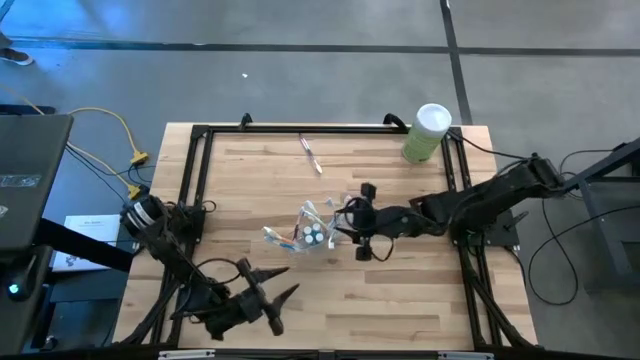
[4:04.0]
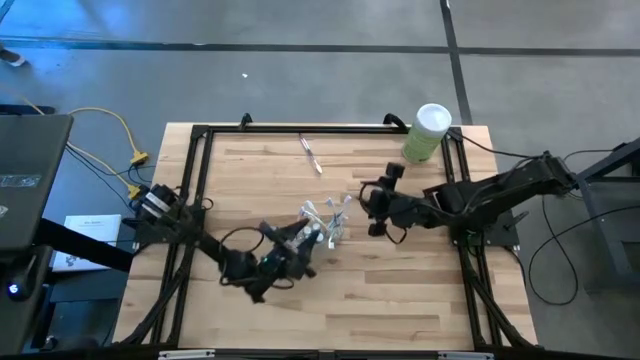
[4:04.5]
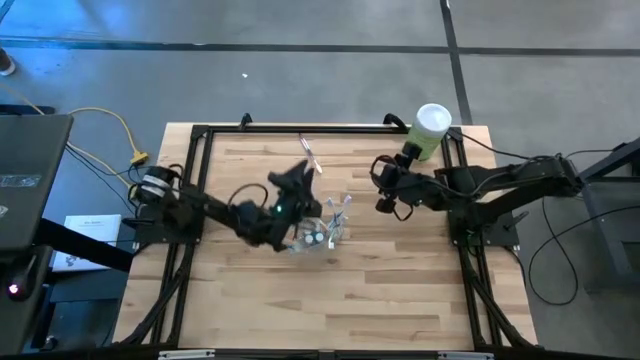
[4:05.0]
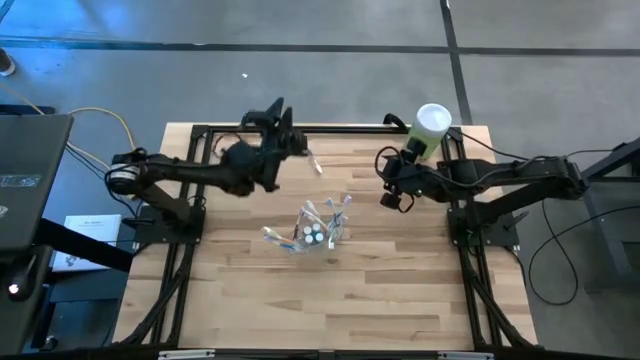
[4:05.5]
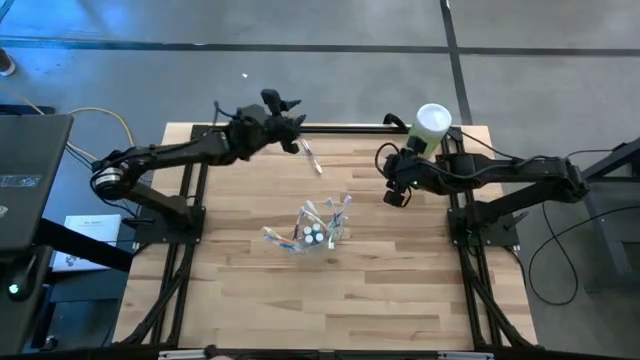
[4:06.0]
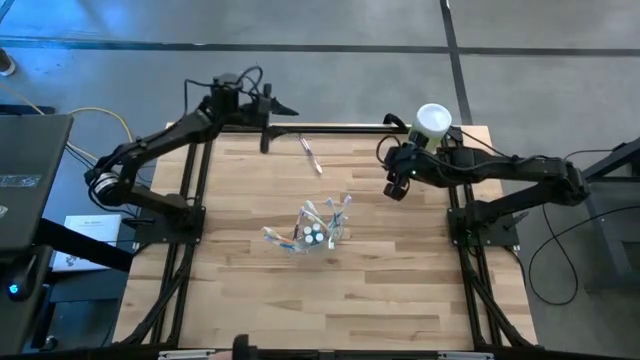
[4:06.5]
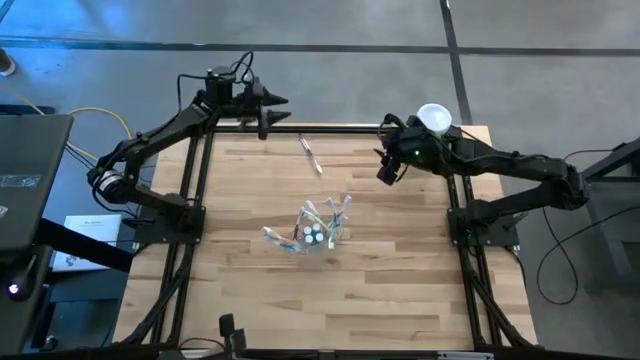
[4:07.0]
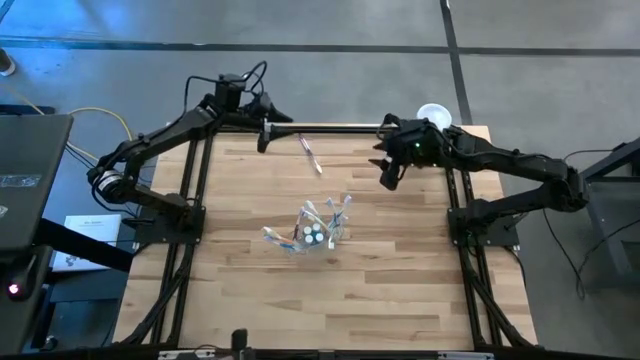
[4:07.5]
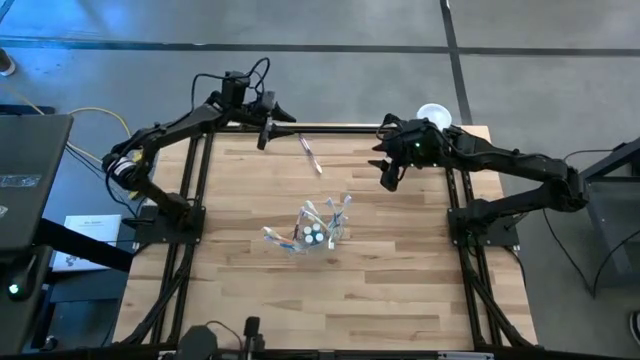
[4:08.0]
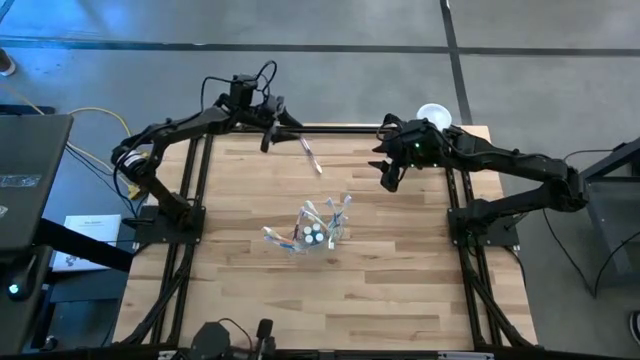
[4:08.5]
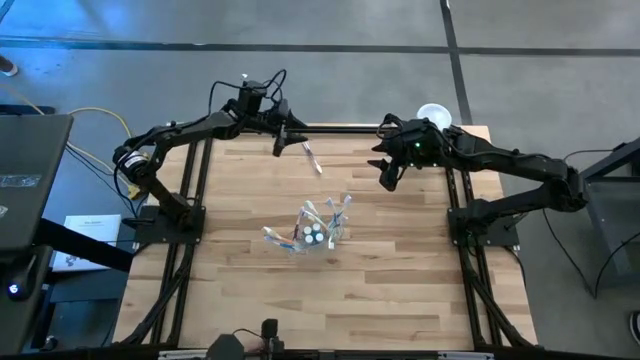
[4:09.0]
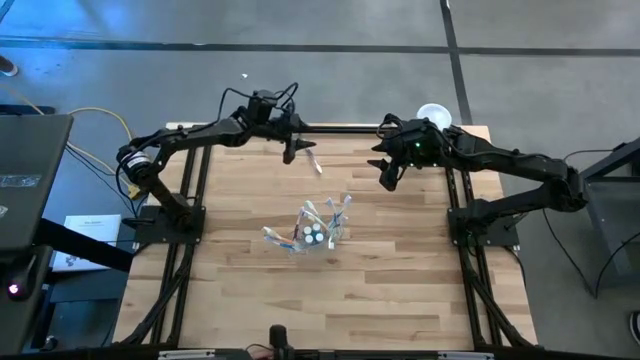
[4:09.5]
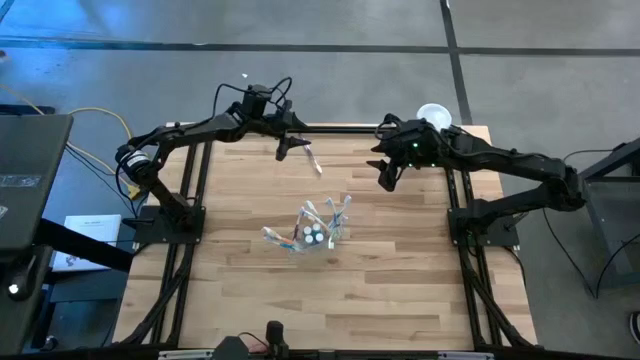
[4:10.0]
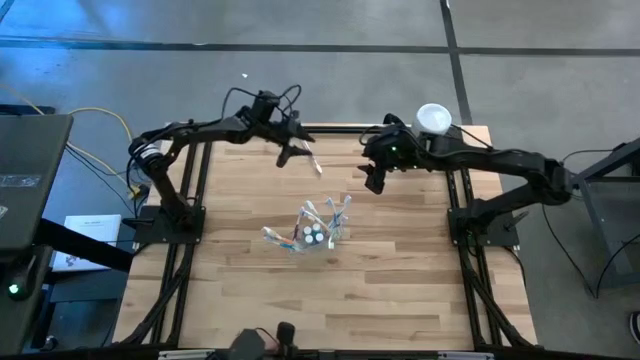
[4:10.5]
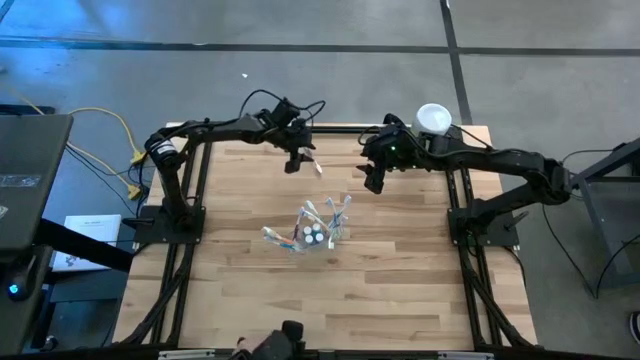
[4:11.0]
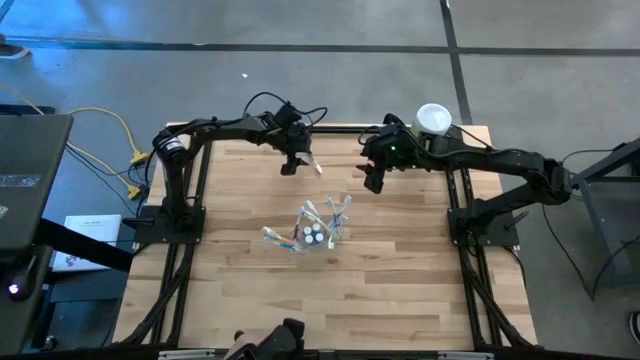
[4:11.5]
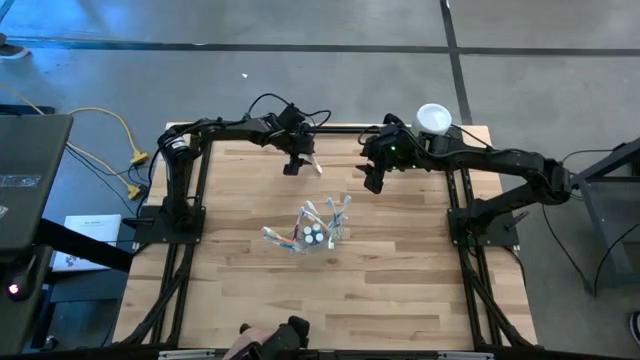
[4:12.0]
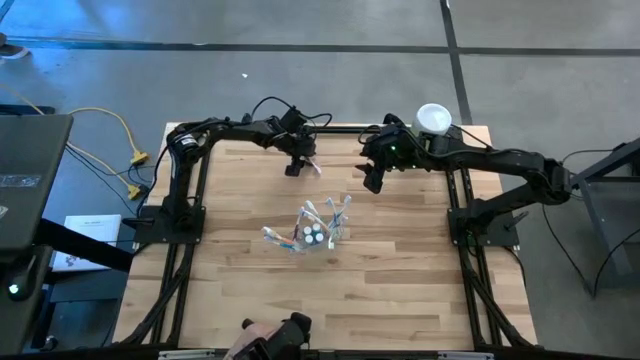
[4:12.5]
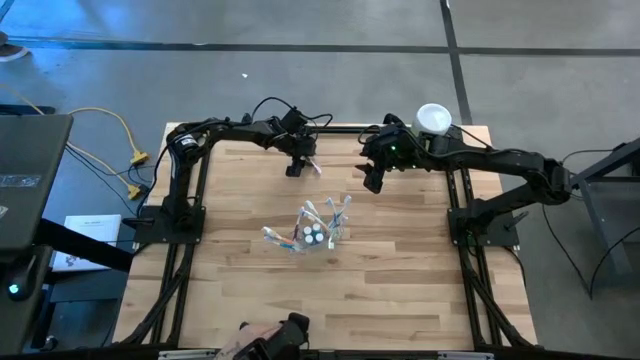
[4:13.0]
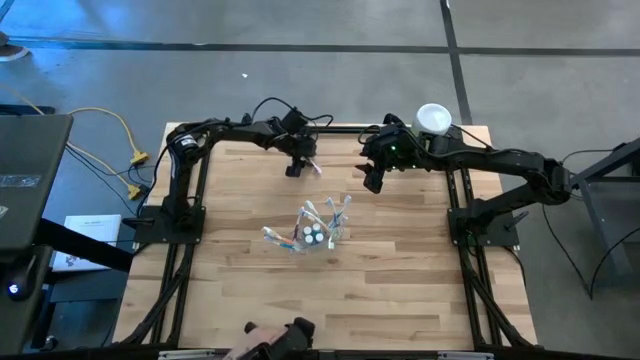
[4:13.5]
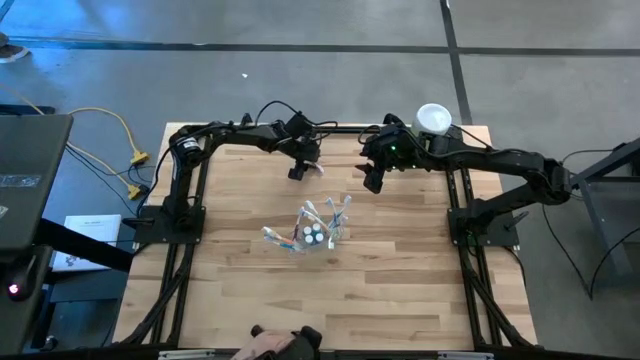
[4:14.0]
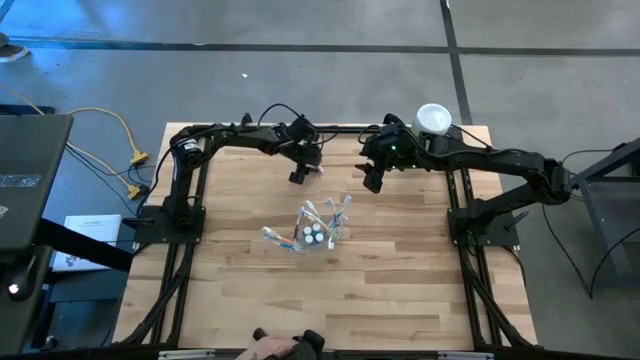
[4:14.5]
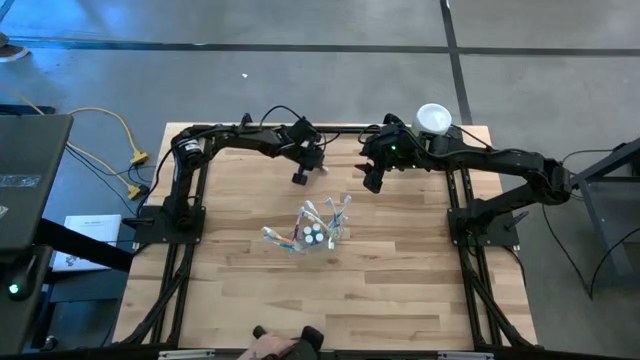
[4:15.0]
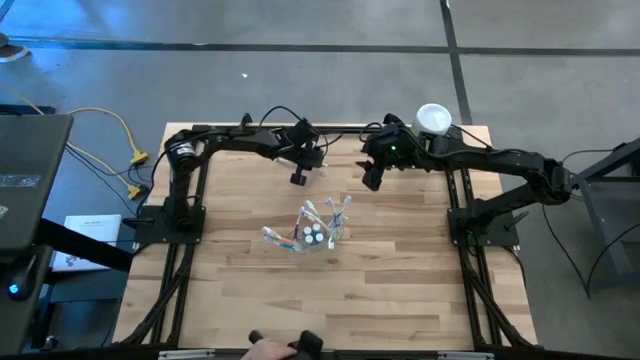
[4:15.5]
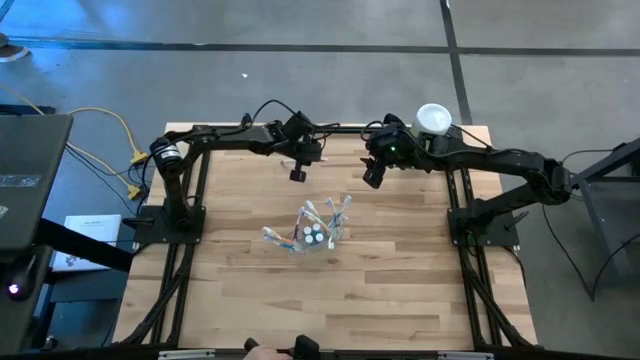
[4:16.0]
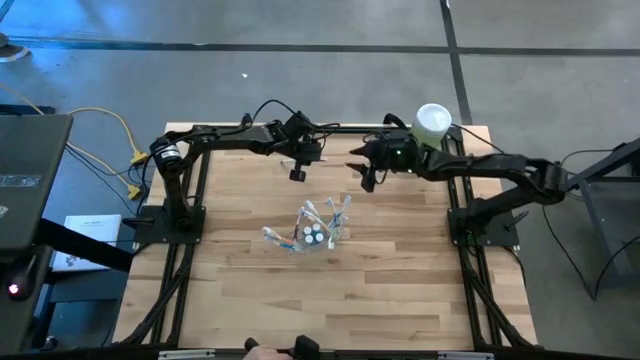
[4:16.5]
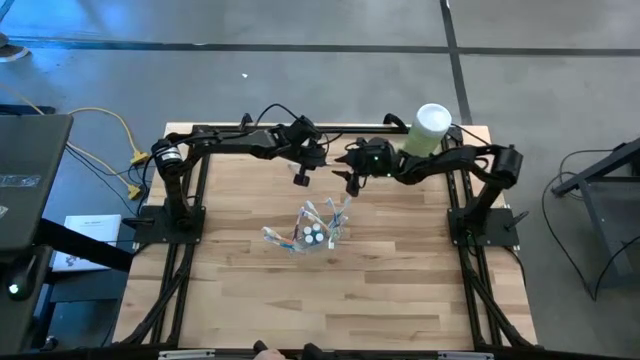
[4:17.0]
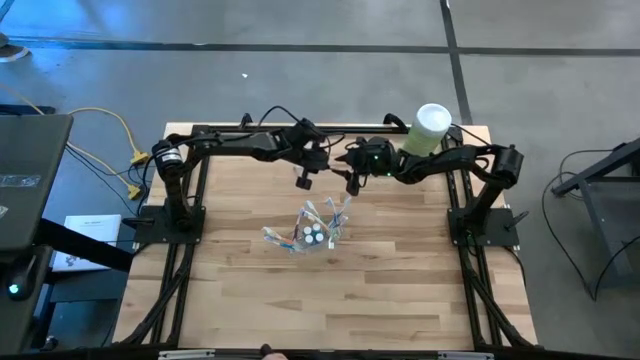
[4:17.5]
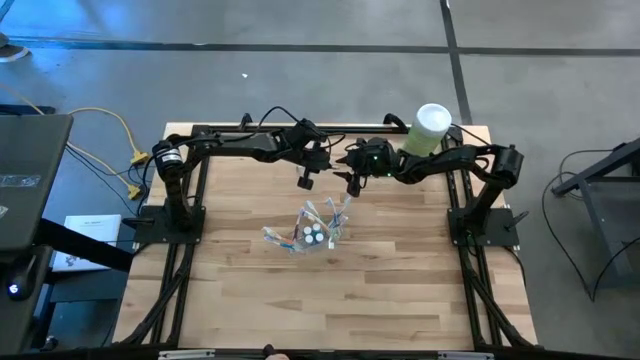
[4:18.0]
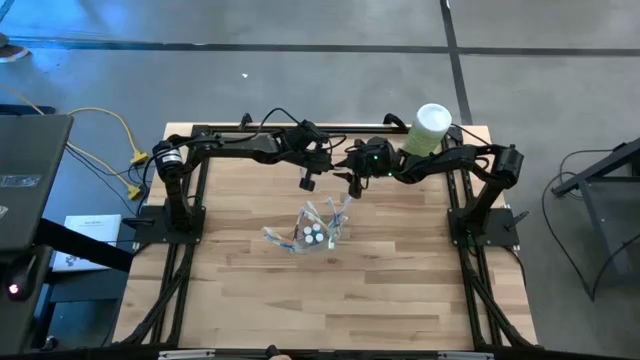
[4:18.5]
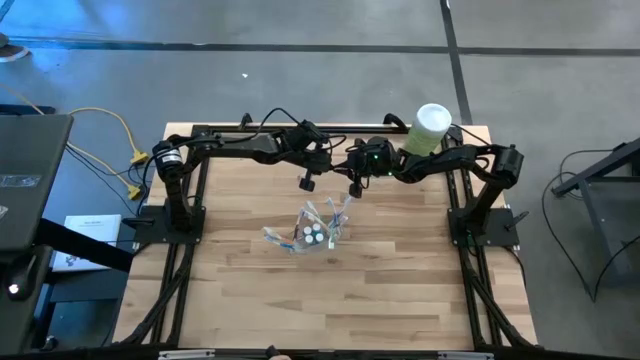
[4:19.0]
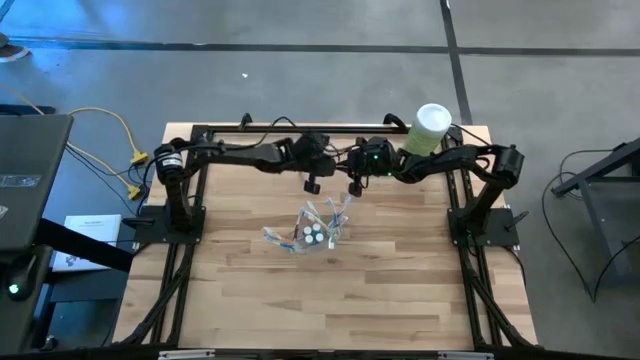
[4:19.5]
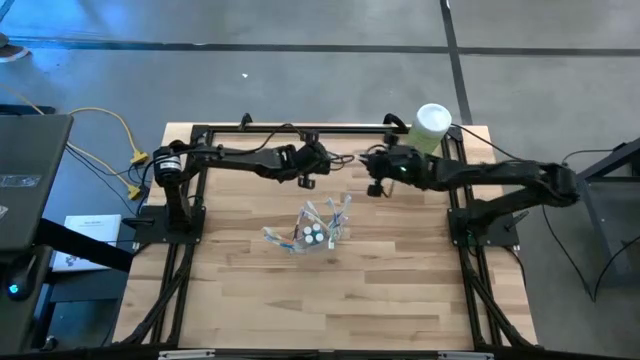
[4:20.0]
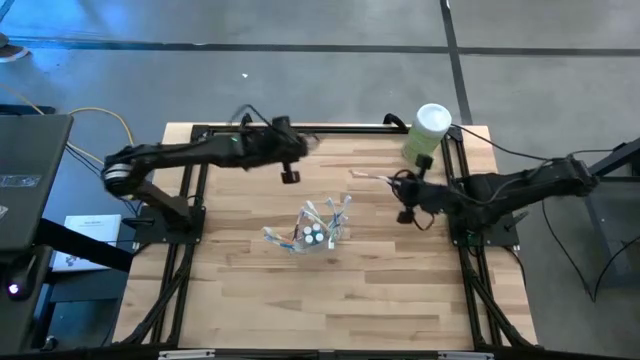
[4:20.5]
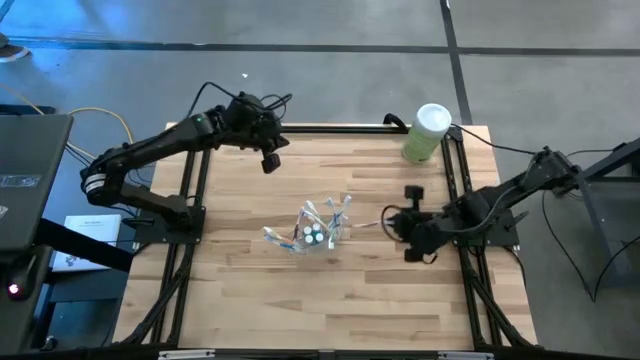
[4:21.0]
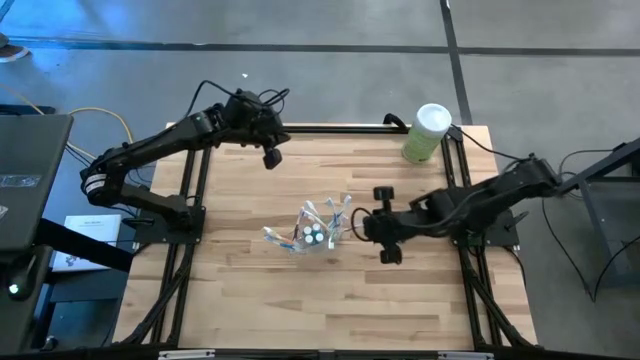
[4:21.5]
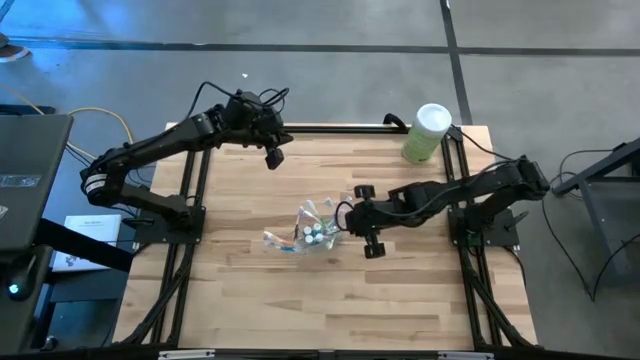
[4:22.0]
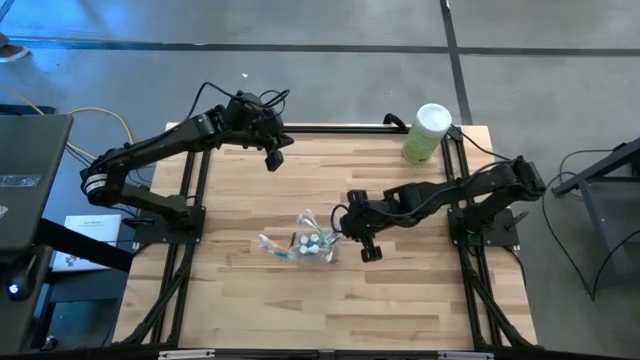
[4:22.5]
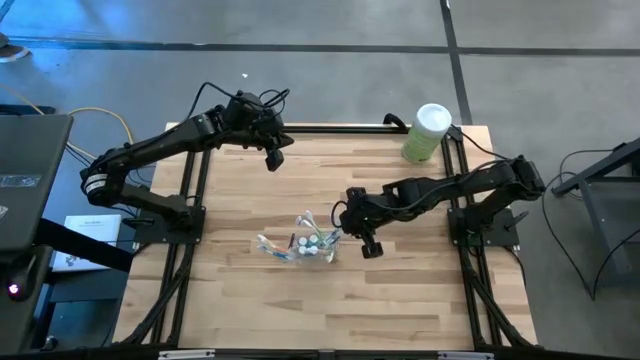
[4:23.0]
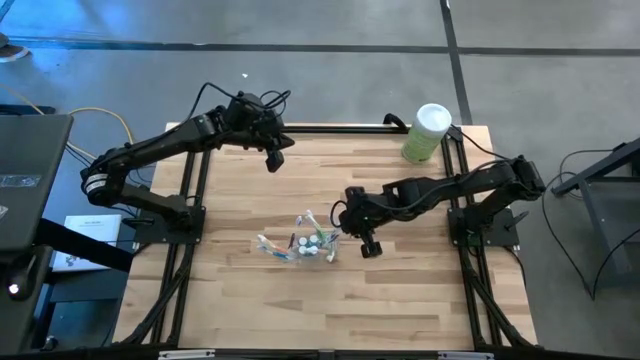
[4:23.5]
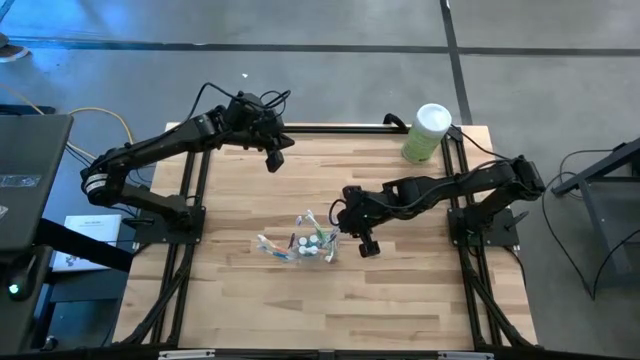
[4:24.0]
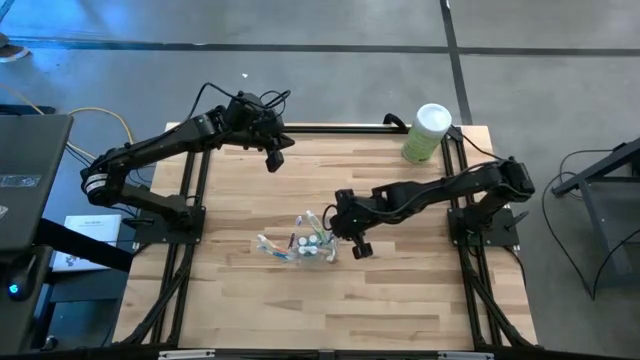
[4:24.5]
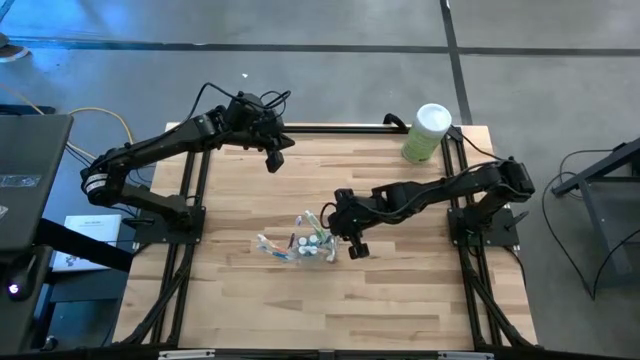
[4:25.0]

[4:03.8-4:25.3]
Task: Pick & Place toothbrushing station
Put the violet toothbrush into the transparent organizer
